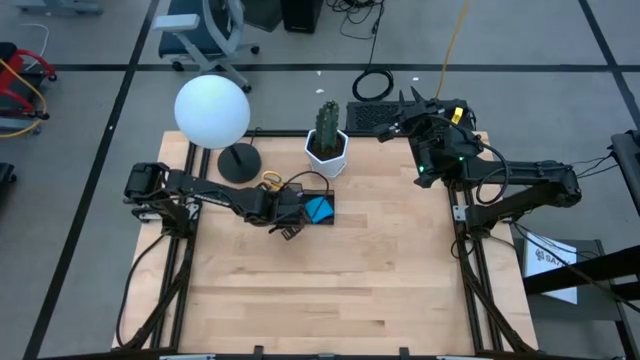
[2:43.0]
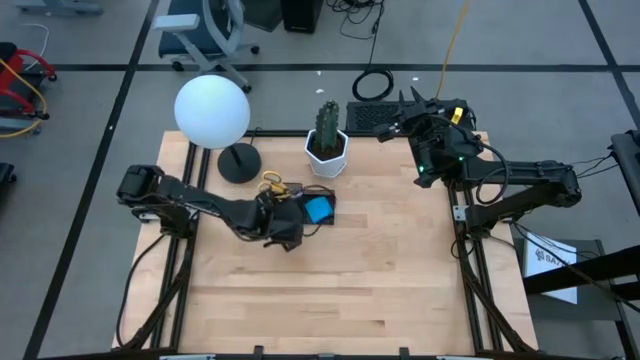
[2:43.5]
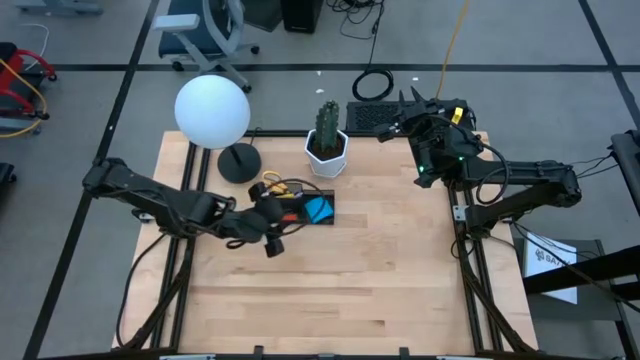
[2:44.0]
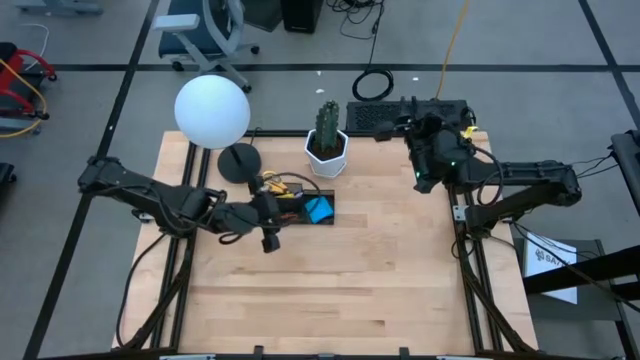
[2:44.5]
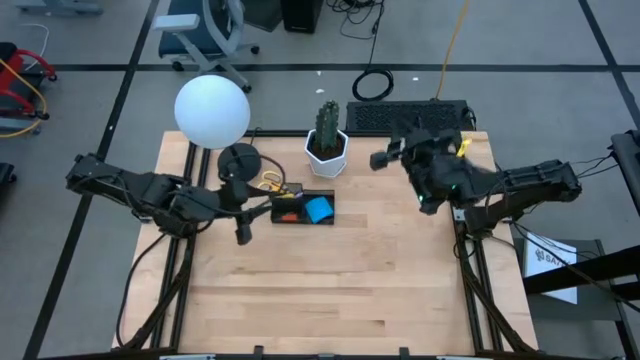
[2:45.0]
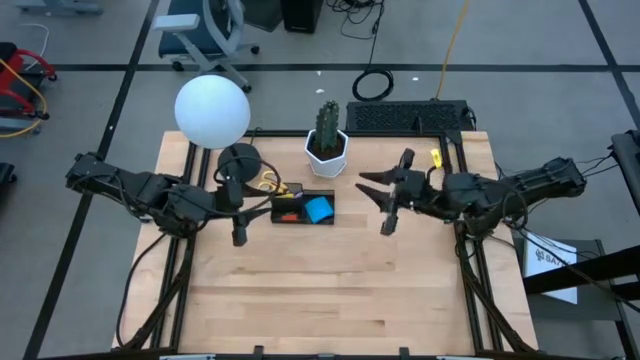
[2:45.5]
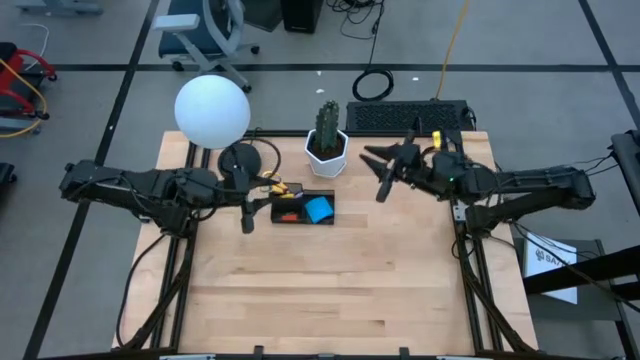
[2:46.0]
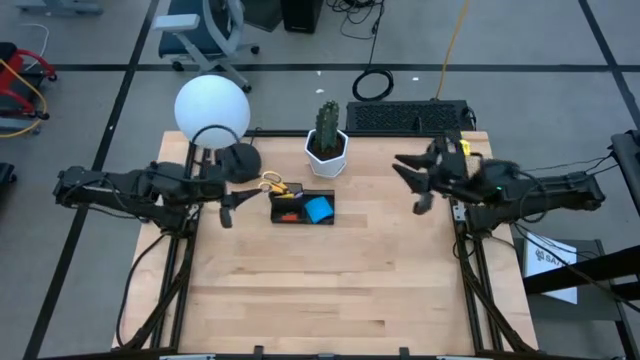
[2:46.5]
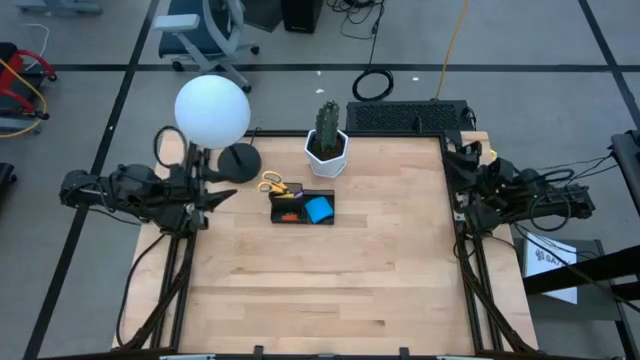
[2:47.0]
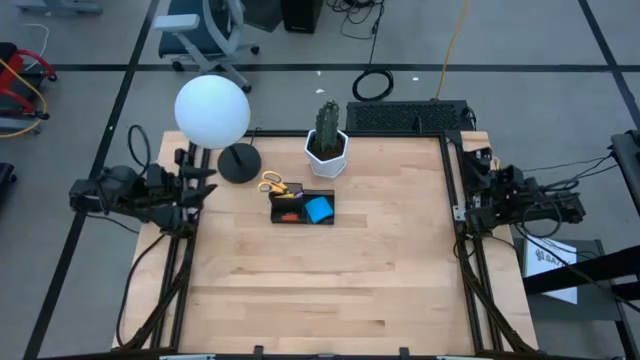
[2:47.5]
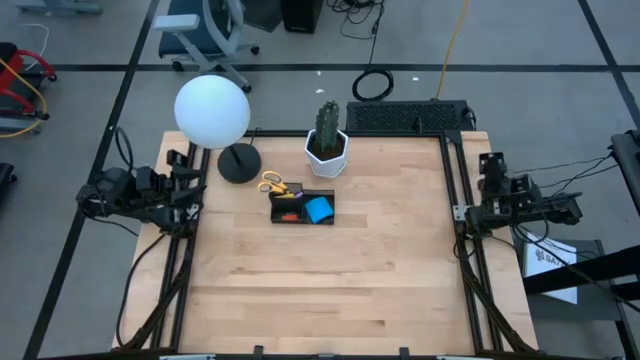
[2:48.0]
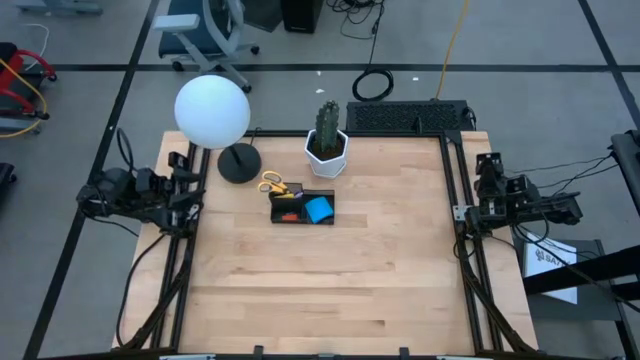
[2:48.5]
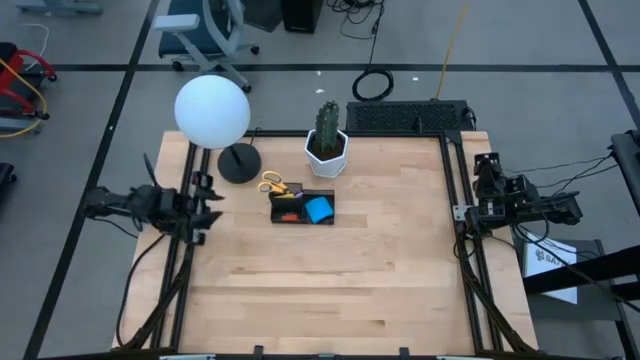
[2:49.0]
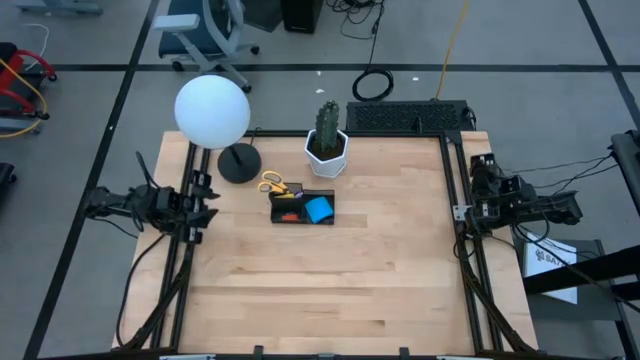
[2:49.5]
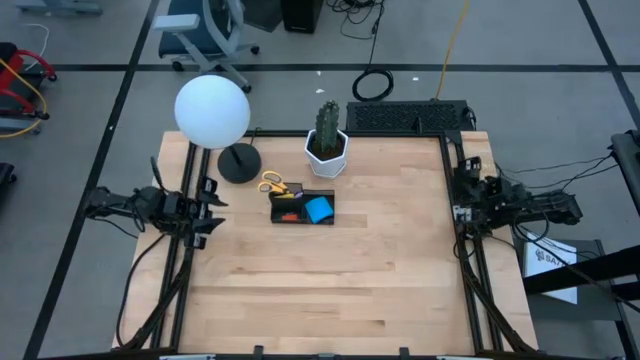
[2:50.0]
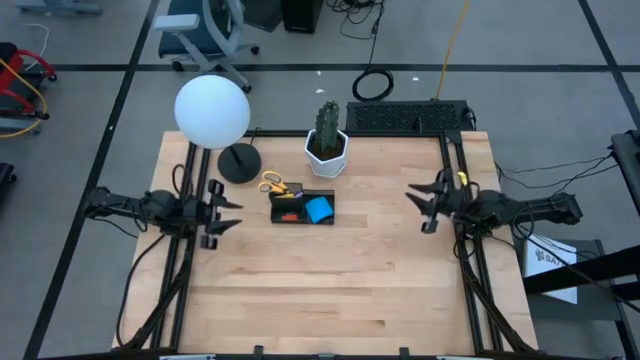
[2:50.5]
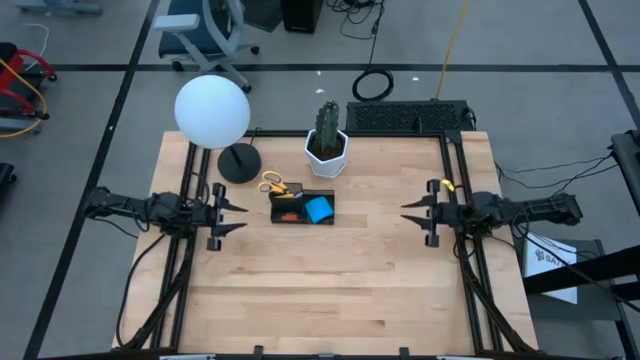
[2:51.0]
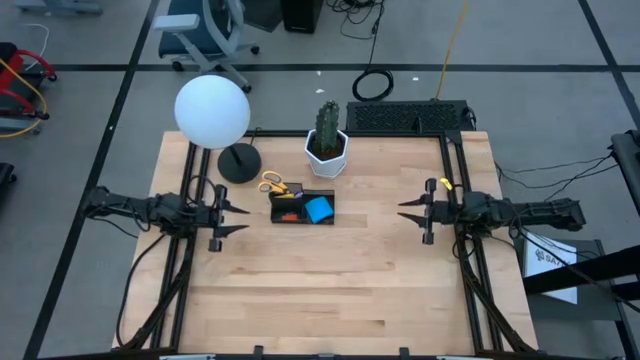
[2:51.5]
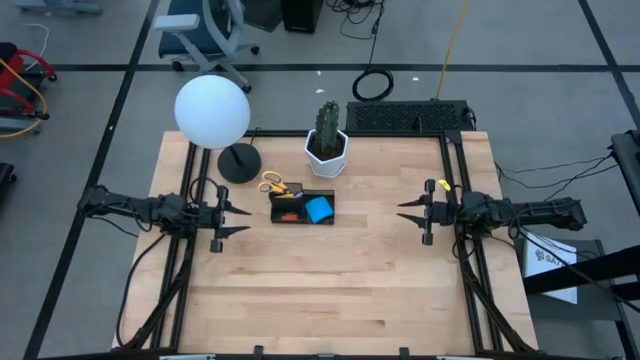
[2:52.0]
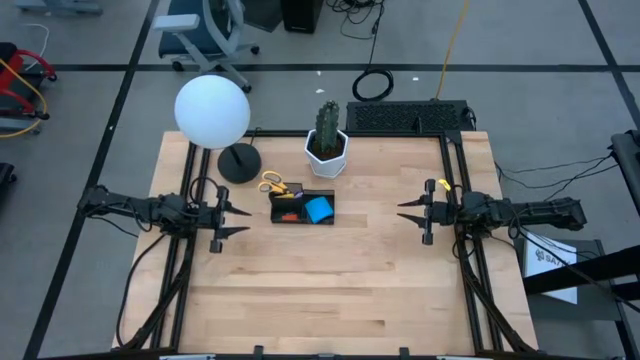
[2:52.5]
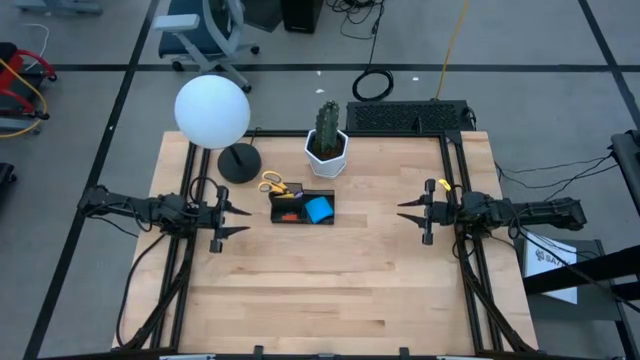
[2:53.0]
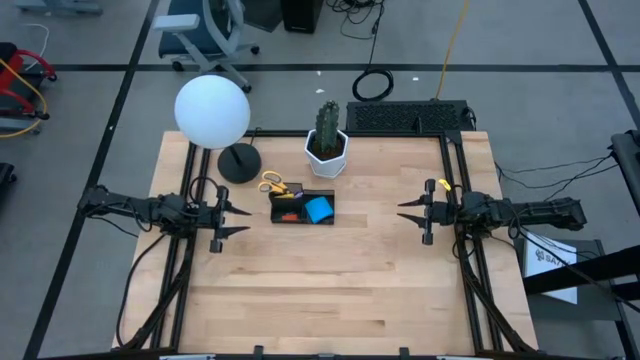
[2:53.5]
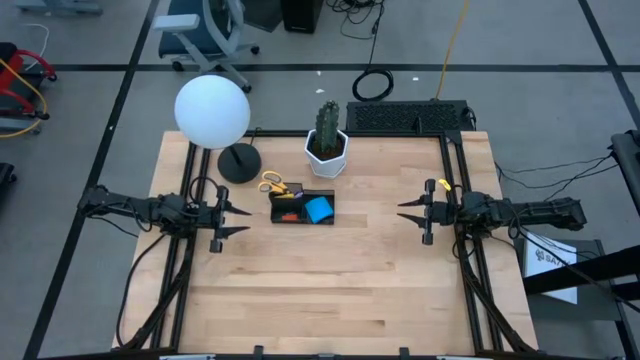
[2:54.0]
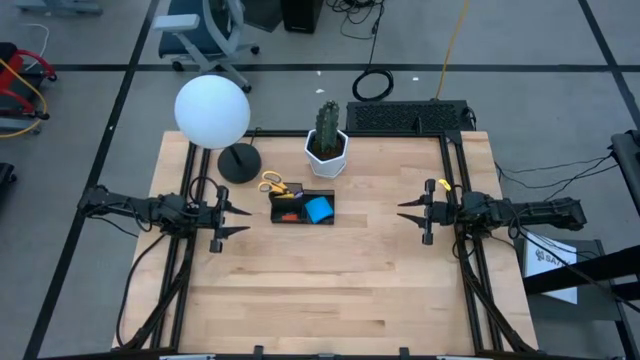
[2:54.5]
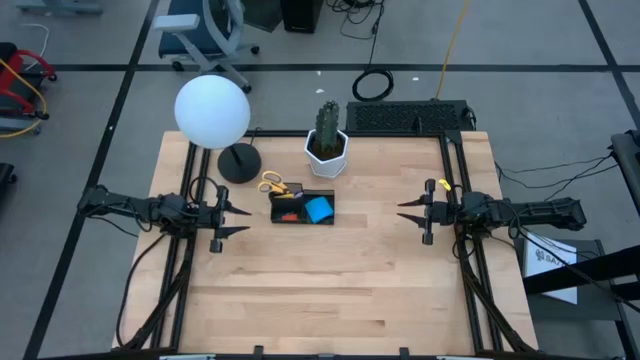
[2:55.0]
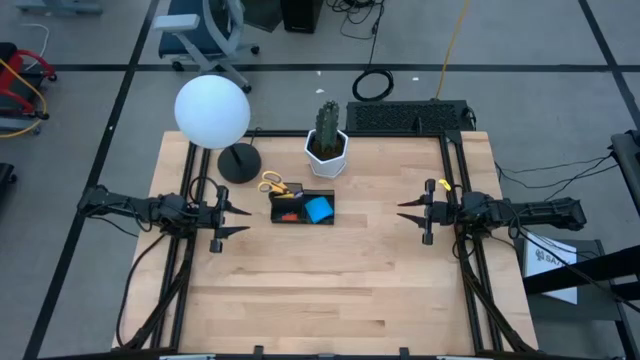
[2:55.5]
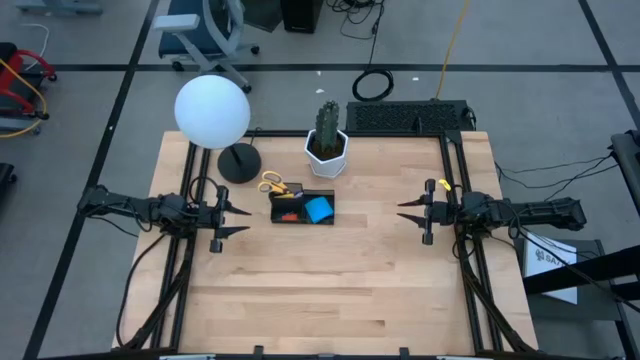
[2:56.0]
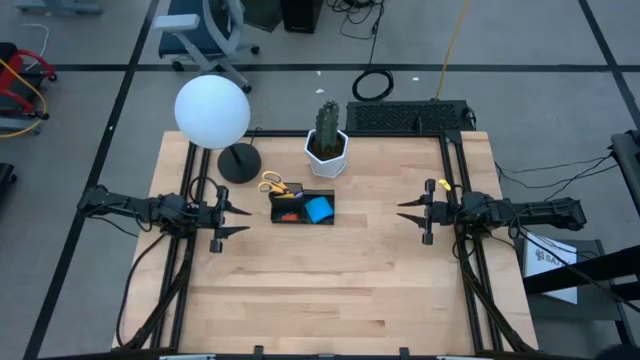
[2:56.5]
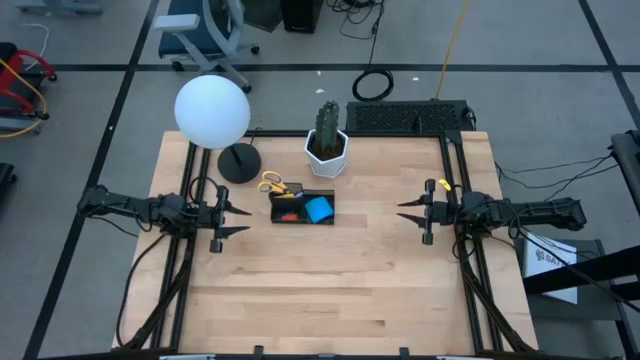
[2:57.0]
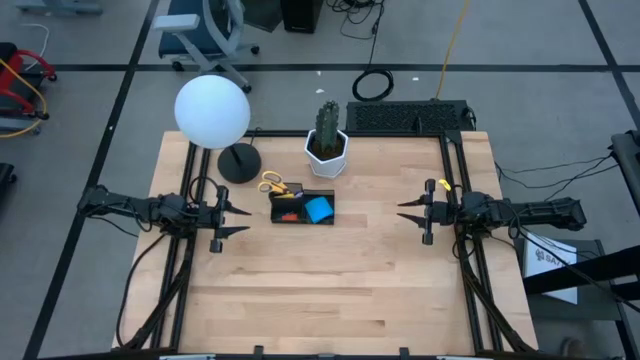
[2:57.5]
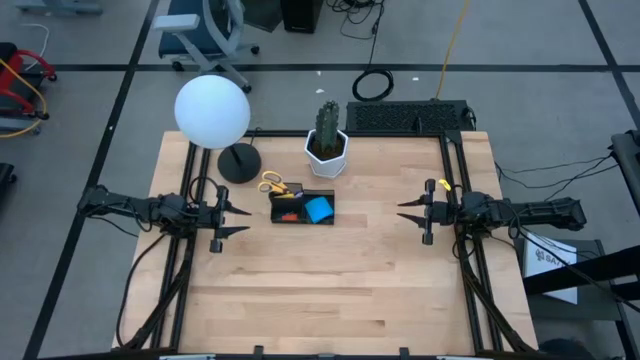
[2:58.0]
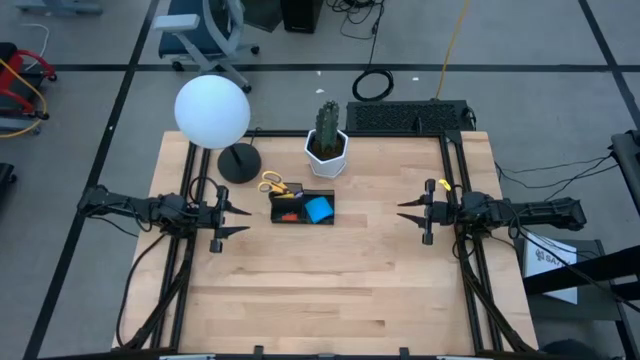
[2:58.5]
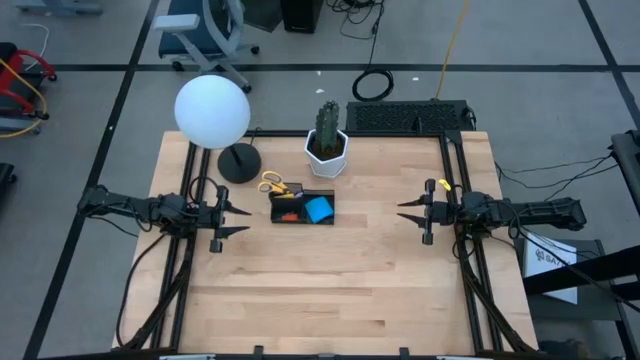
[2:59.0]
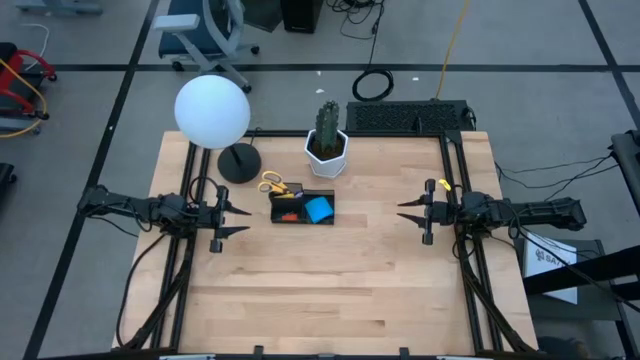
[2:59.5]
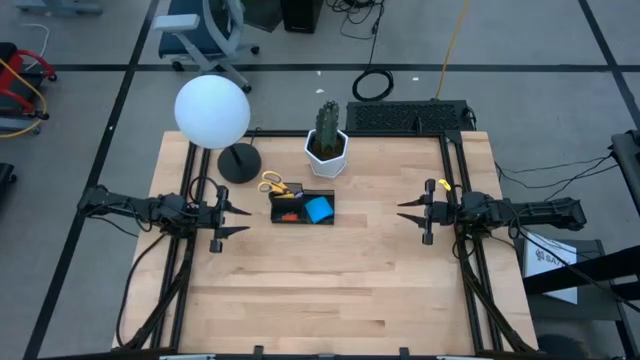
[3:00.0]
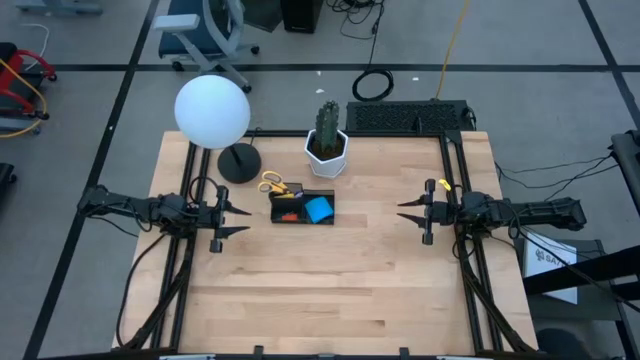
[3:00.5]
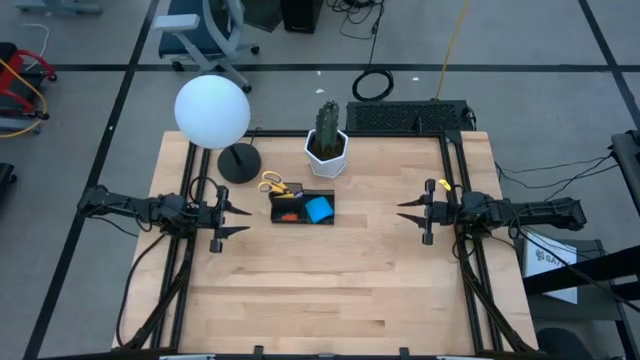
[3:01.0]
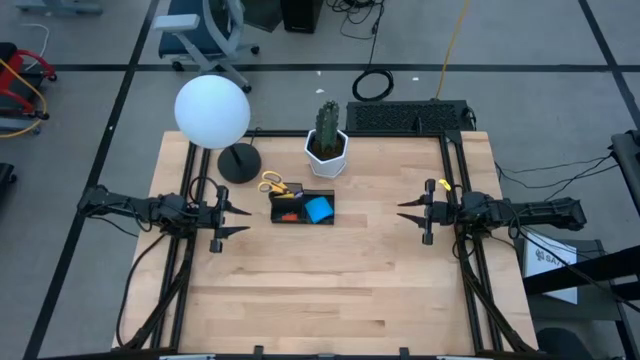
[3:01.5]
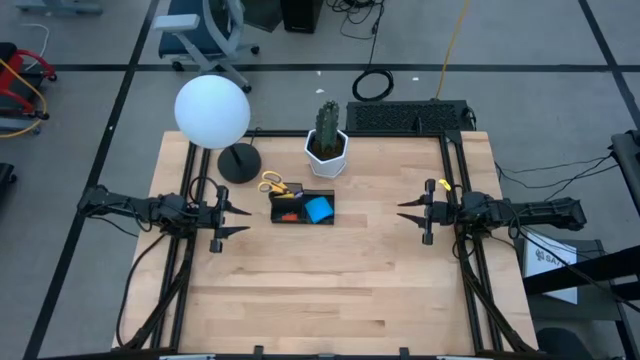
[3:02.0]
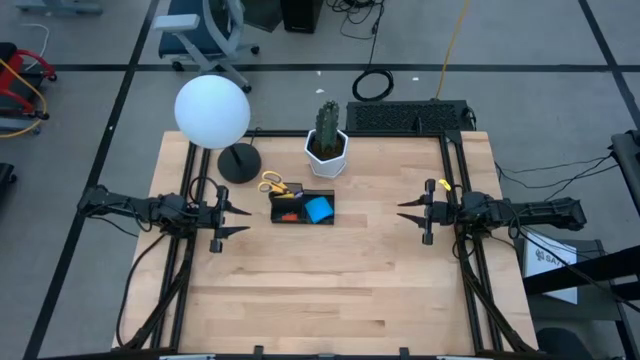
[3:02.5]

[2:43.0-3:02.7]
Task: Pick and place office supplies into organizer
Return to Home Position

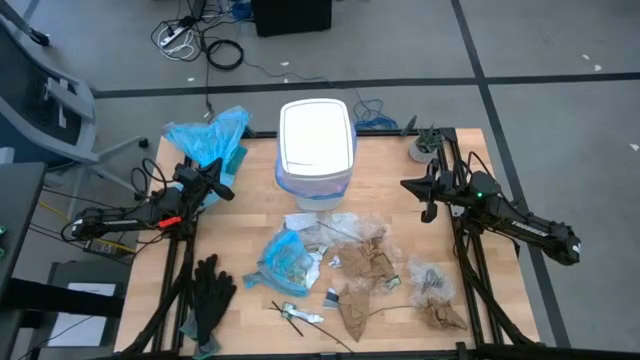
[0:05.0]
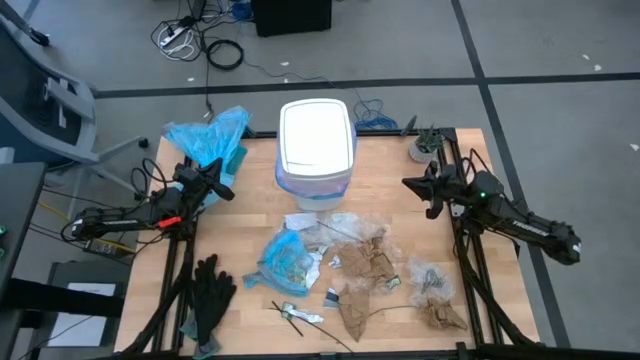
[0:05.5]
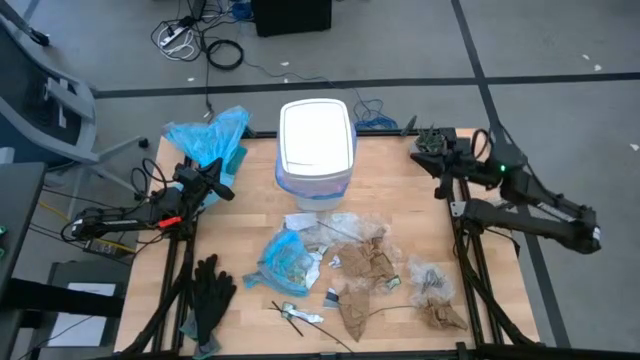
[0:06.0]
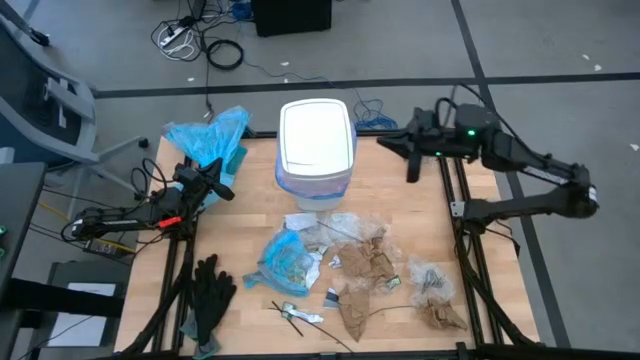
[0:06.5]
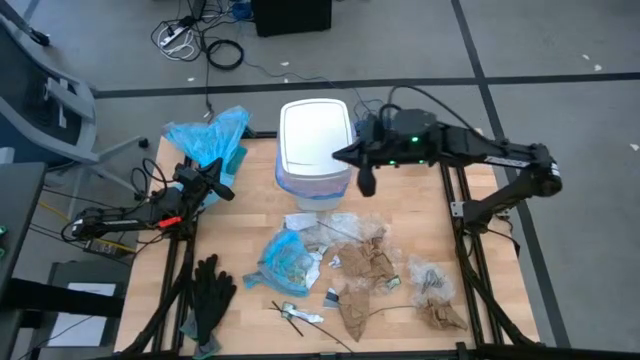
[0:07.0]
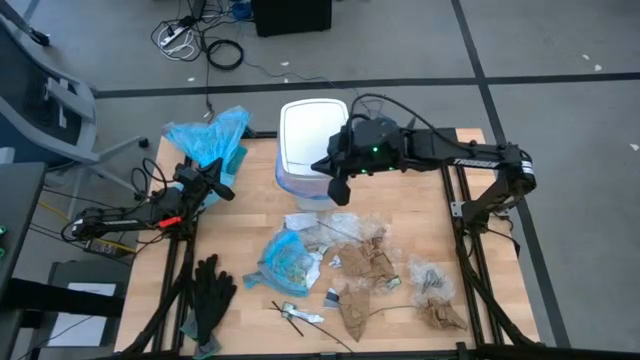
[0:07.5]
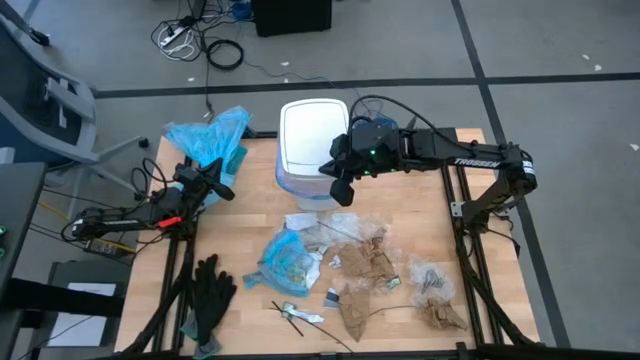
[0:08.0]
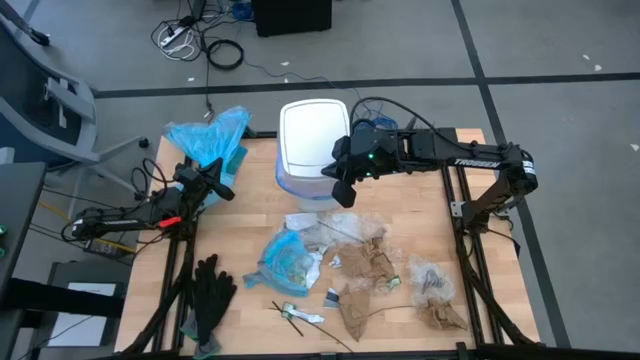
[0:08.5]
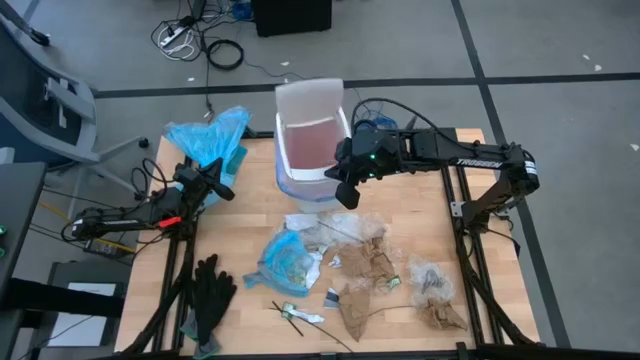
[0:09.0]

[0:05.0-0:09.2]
Task: place trash/remove bag and relplace
Open the lid of the white trash bin
